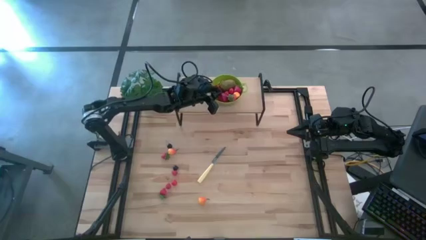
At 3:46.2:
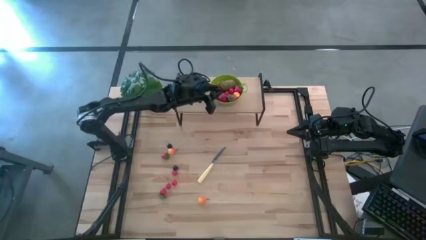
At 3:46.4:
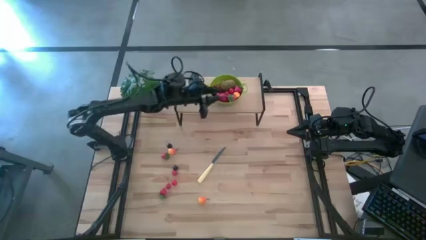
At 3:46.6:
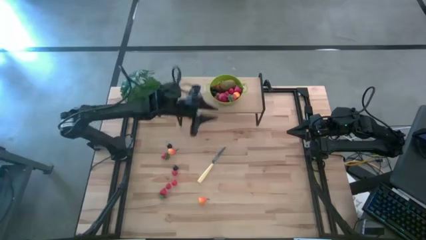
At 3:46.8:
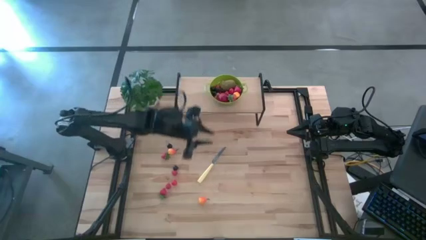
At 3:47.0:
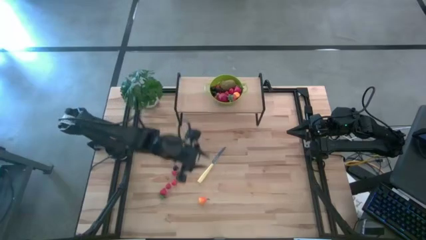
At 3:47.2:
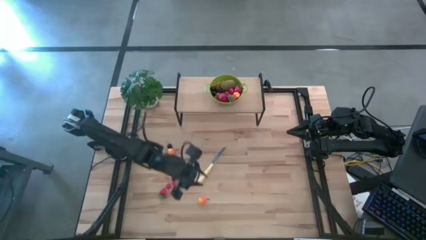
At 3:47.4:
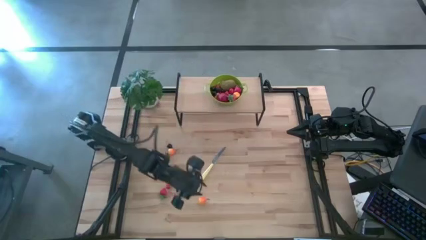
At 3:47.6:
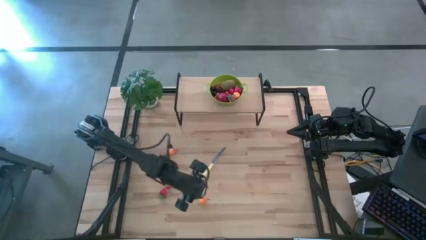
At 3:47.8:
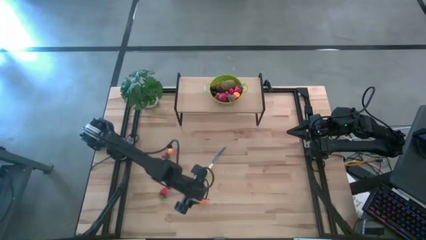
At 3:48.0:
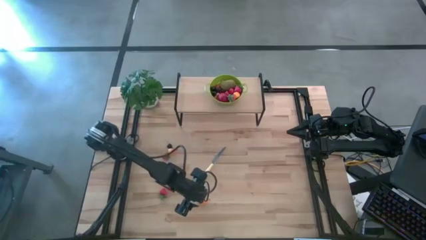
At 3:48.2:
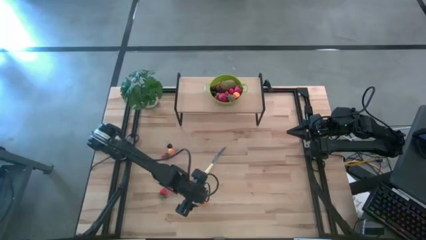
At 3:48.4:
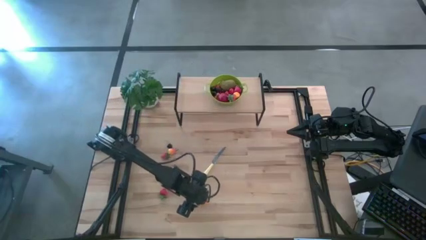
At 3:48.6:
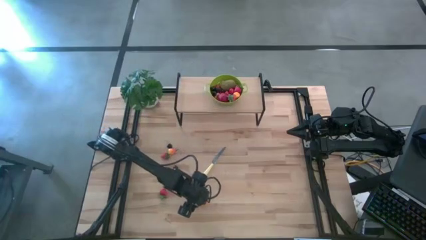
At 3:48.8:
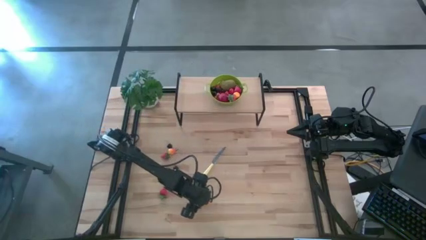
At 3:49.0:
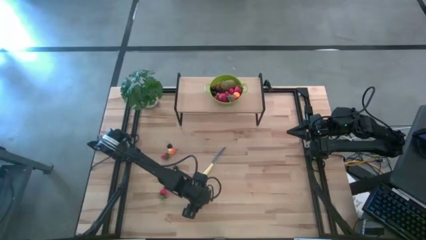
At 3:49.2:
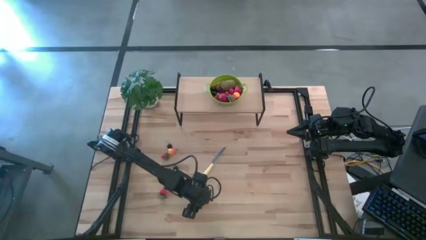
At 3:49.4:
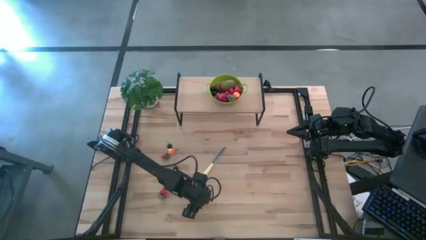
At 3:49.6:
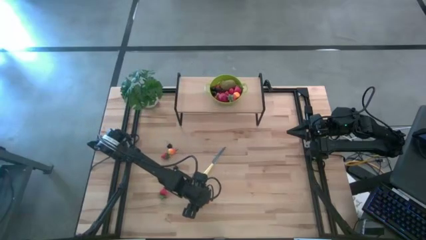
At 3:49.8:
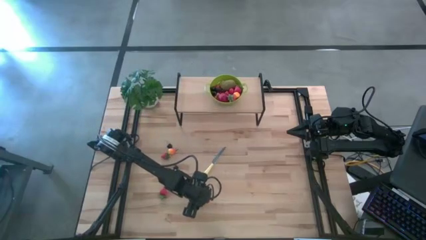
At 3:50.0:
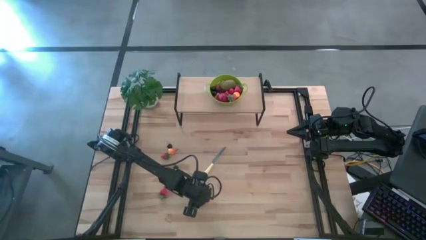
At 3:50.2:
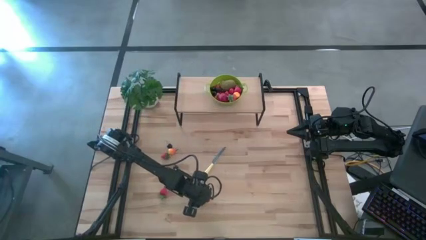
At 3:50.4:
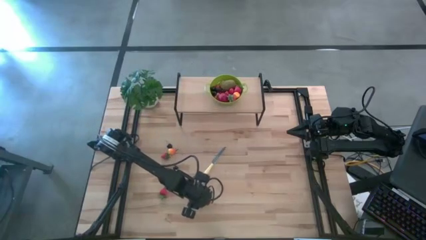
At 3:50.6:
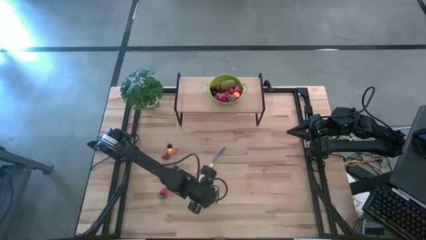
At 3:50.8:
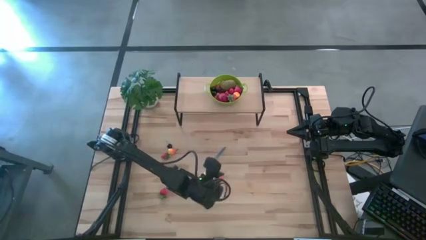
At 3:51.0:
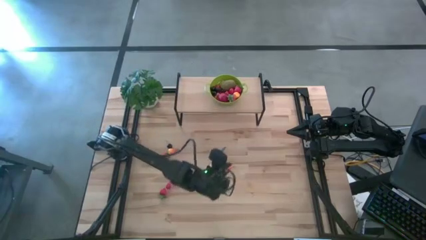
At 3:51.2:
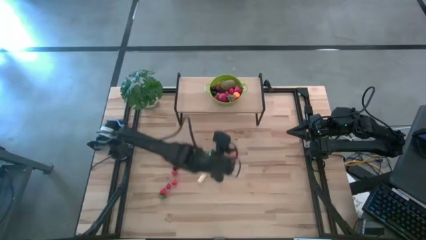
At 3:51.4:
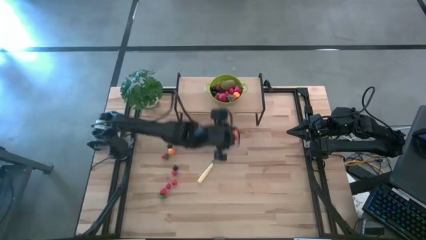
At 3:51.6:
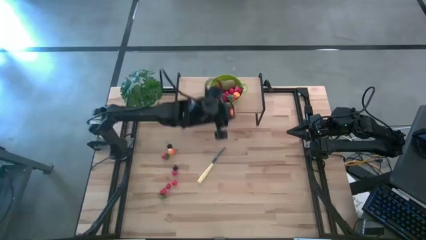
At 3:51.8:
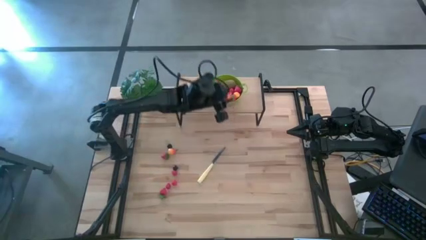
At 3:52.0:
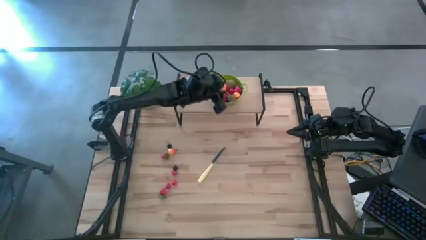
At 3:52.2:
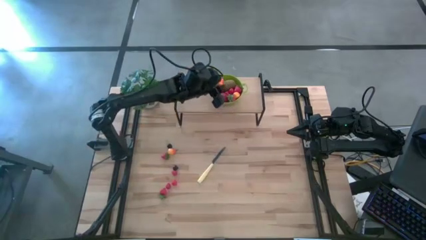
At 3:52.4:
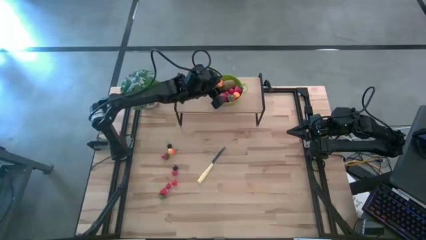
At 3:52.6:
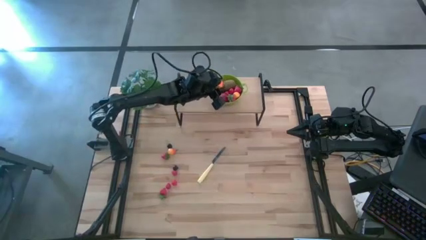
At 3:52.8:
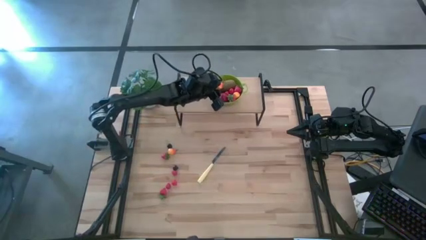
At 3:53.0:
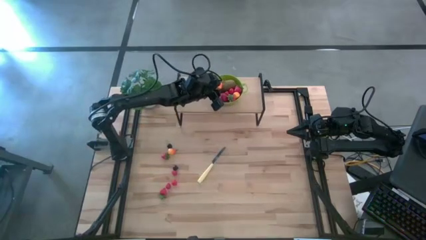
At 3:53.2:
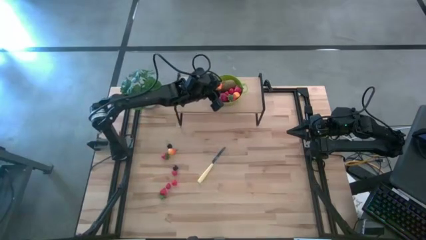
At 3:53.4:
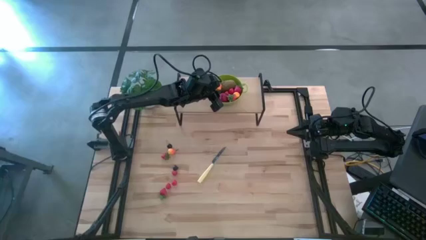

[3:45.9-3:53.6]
Task: Pick & Place Fruit
Put the pear into the strainer bowl

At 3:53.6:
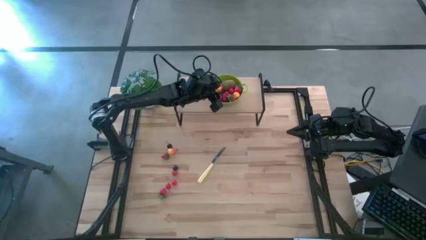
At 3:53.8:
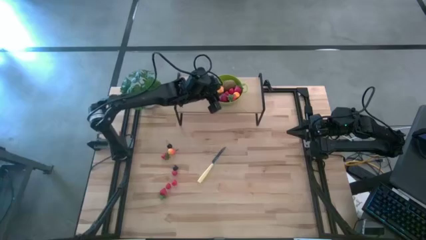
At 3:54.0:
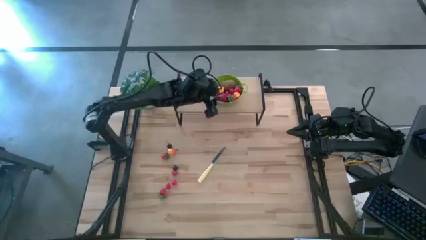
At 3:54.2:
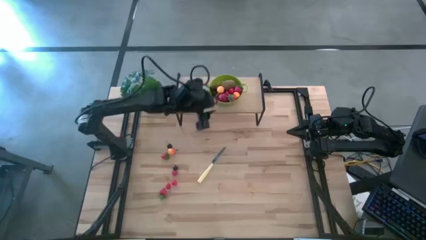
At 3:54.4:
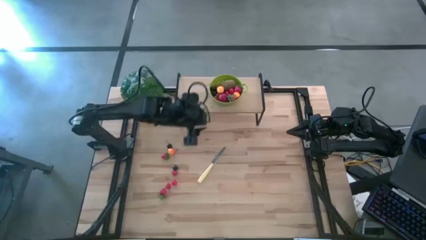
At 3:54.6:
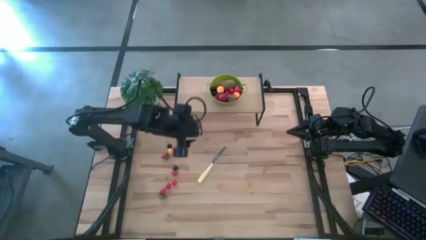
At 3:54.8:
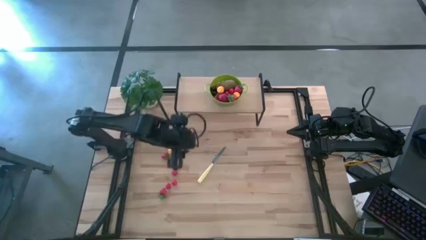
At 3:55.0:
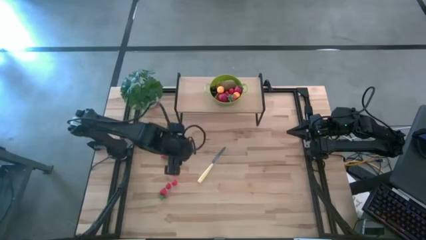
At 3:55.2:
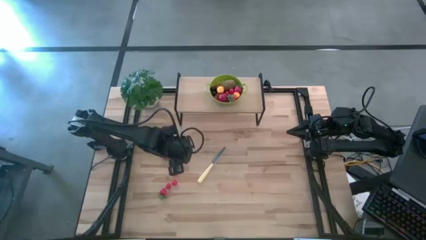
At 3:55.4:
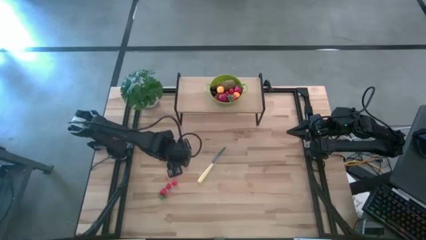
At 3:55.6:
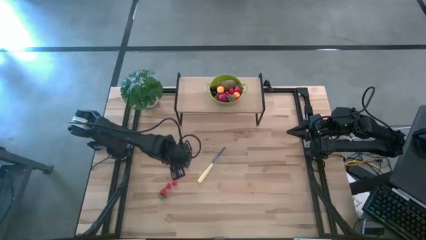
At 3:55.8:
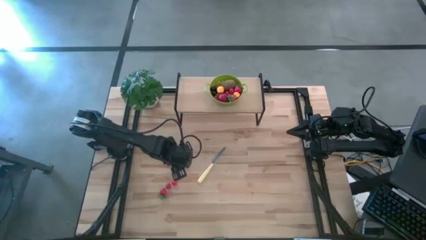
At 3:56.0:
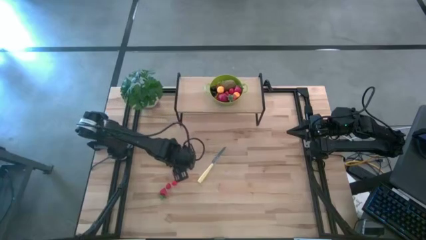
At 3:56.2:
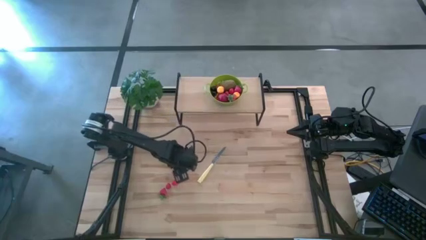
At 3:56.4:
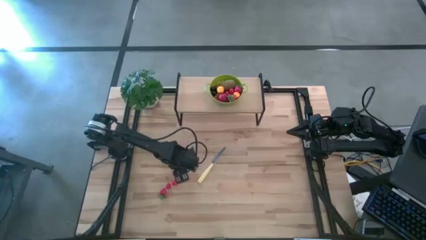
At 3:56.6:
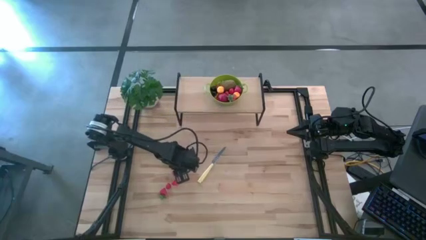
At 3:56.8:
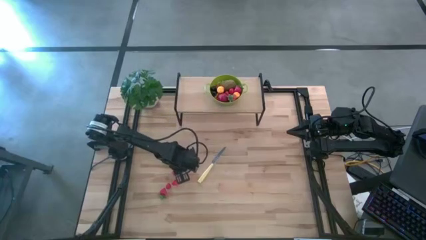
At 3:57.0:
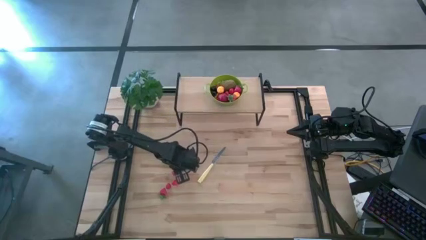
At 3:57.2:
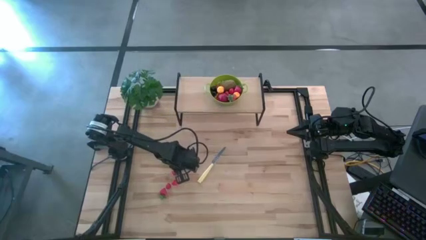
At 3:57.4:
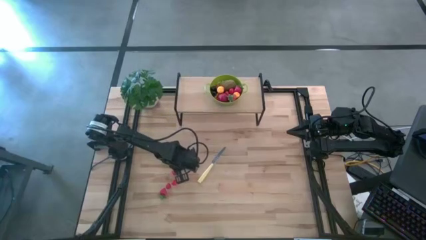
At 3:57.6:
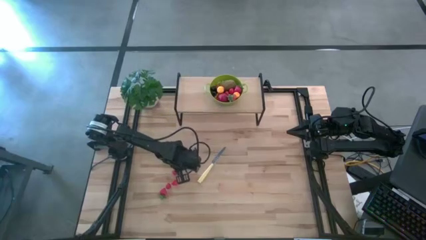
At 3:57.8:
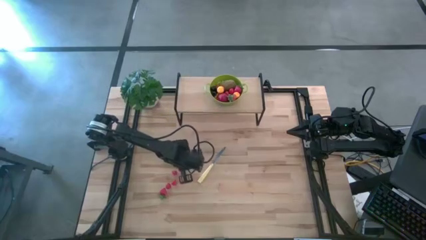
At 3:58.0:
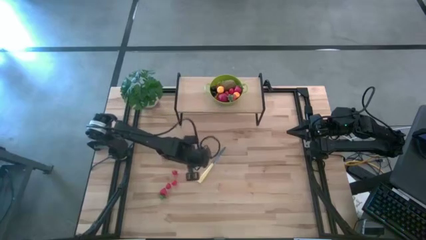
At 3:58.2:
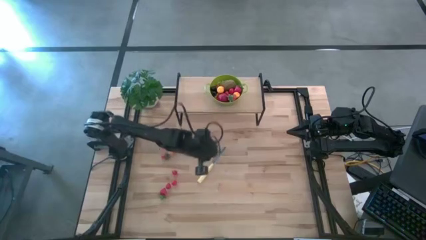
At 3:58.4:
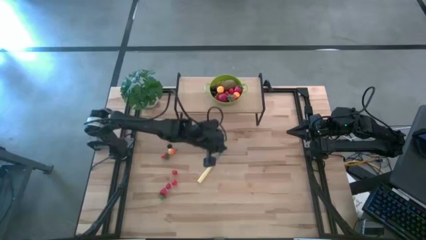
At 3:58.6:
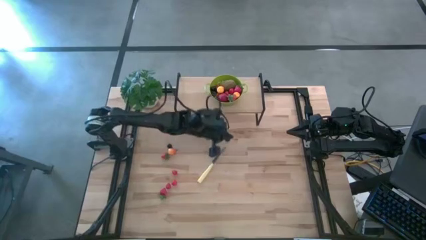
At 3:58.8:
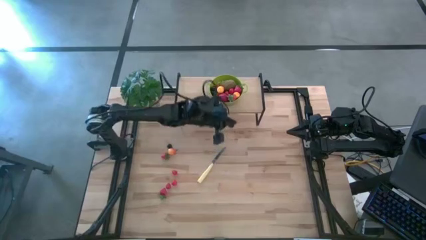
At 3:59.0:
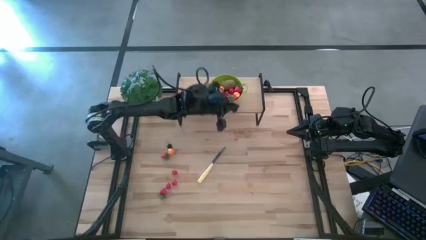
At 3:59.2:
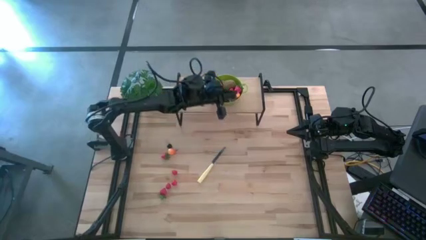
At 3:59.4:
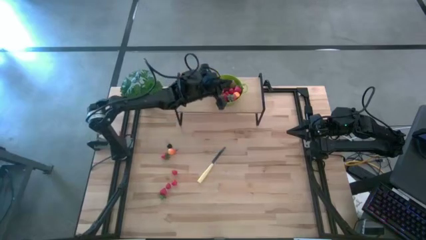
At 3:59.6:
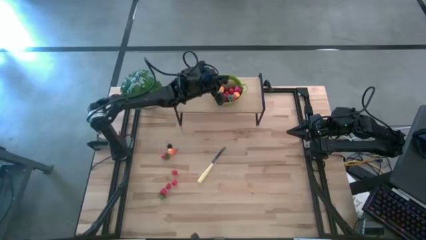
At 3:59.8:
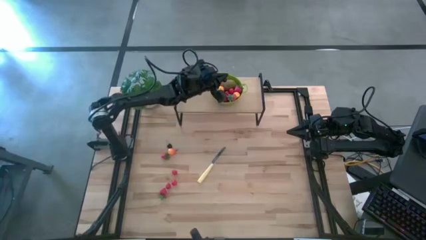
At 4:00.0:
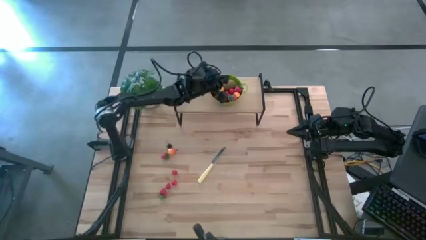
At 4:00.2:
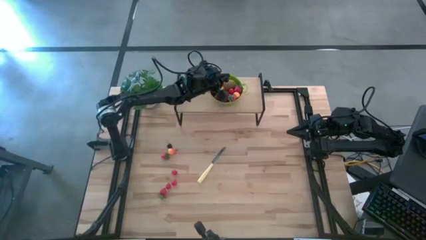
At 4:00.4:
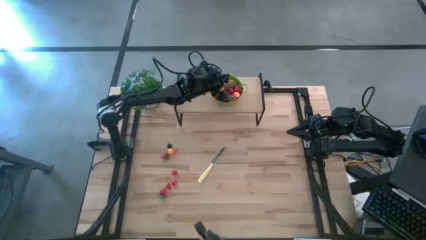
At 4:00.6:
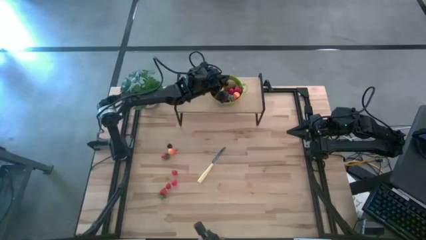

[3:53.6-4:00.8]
Put the black cherry into the strainer bowl

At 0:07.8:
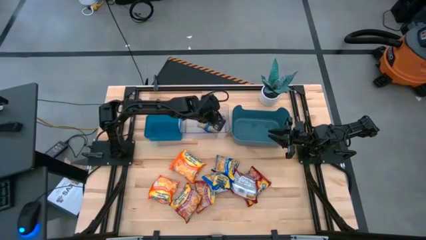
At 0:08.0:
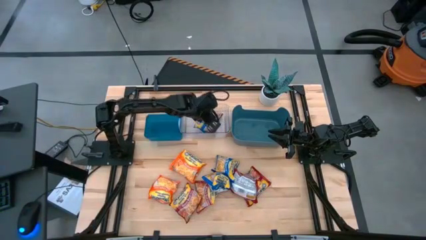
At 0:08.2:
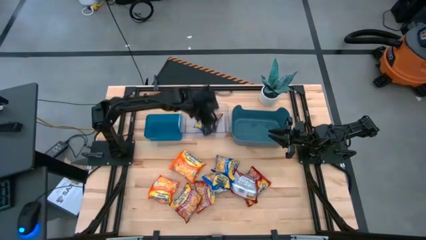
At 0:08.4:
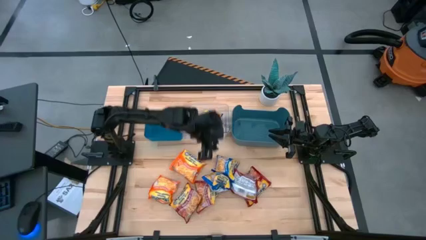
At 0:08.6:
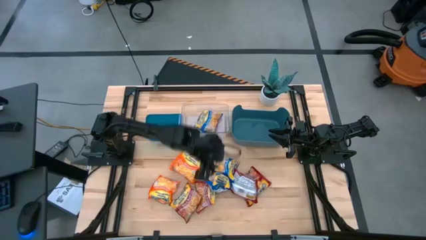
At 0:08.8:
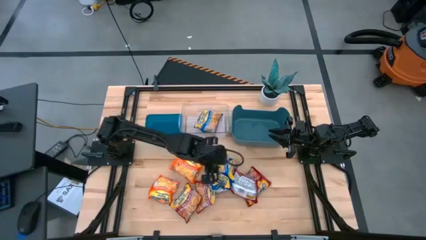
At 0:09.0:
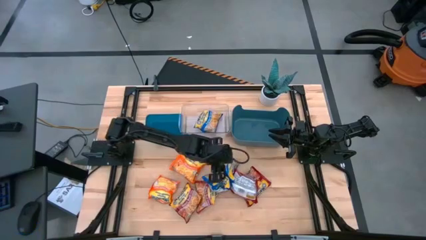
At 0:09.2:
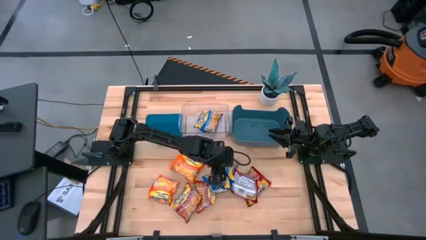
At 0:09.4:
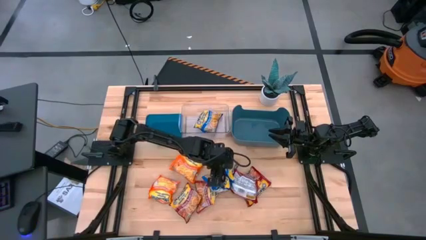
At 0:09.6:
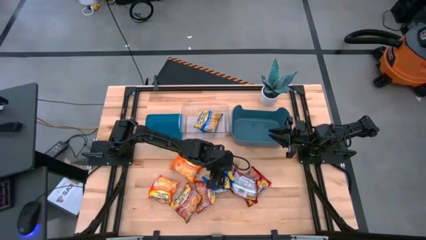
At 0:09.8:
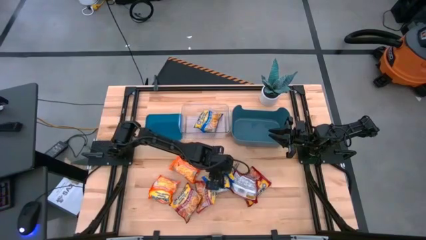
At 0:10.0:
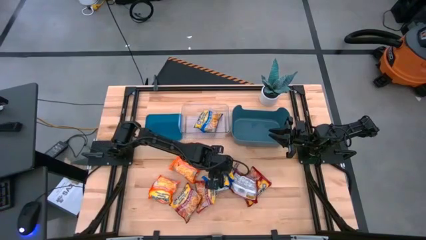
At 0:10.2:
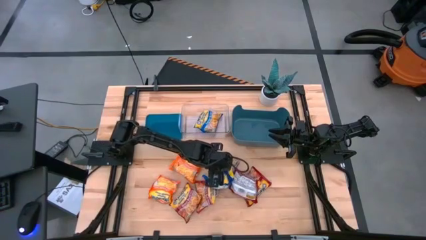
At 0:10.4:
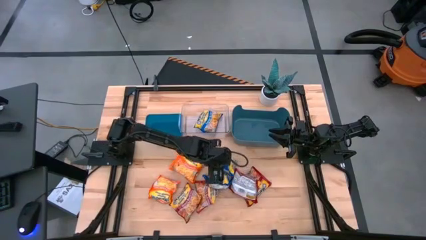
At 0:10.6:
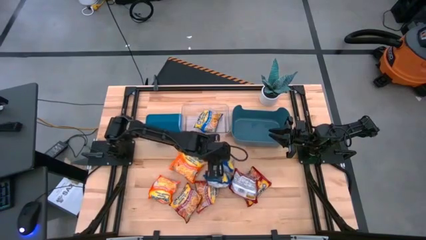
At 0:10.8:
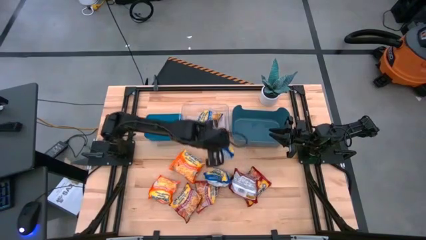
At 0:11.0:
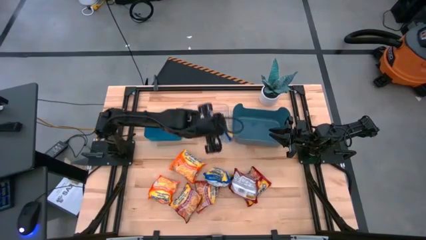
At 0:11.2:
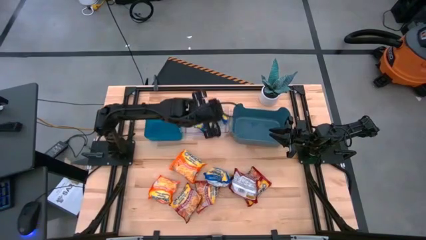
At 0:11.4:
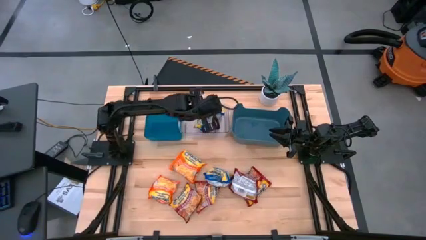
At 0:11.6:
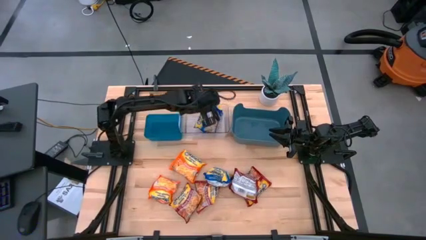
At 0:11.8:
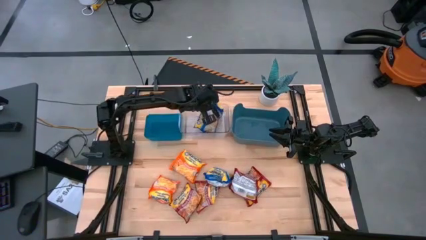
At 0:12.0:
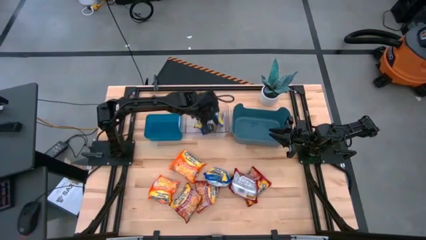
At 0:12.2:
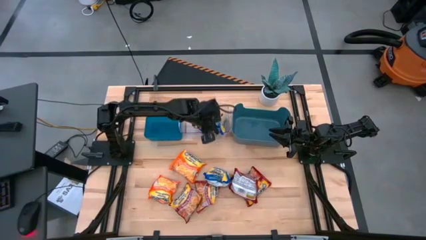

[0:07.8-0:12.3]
Task: Sort Maruchan noodles
Put the top blue noodle pack into the transparent bin
